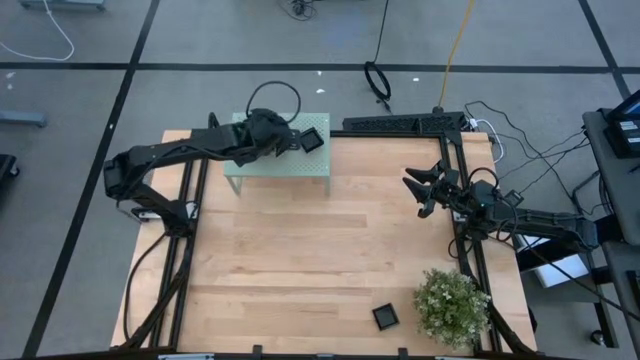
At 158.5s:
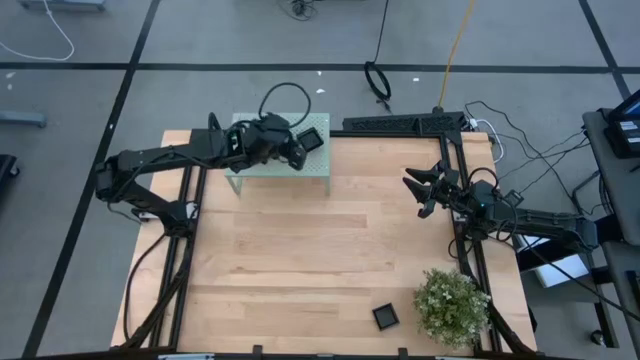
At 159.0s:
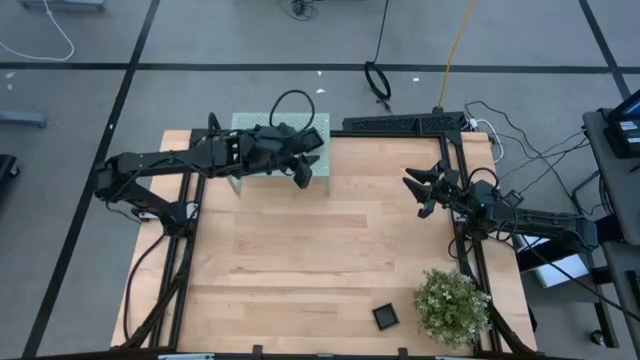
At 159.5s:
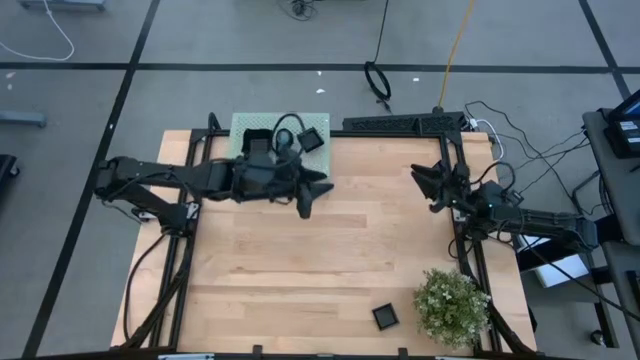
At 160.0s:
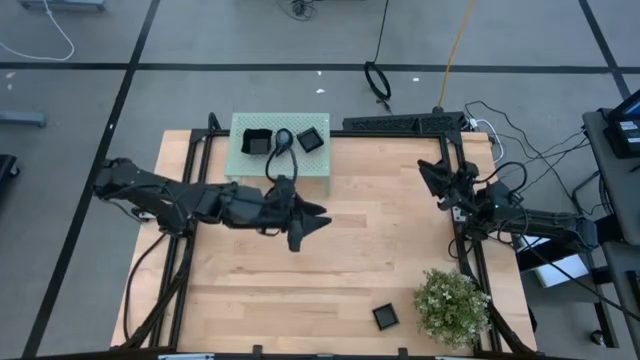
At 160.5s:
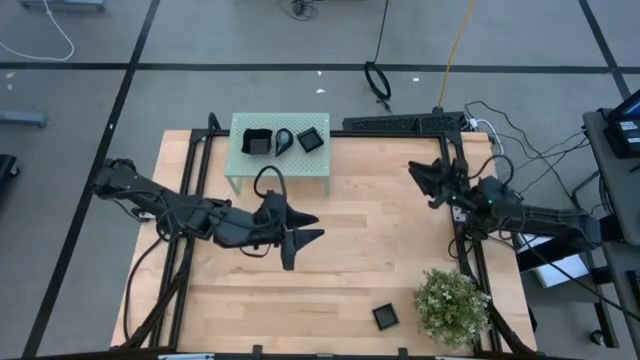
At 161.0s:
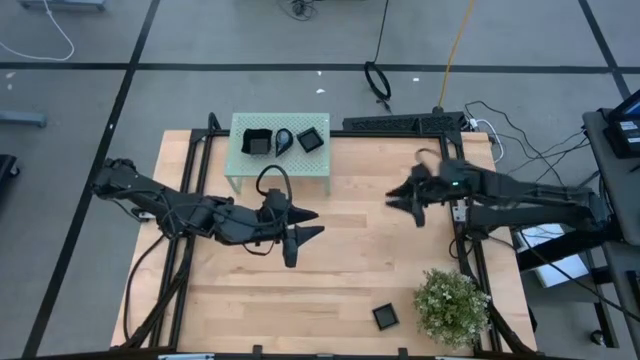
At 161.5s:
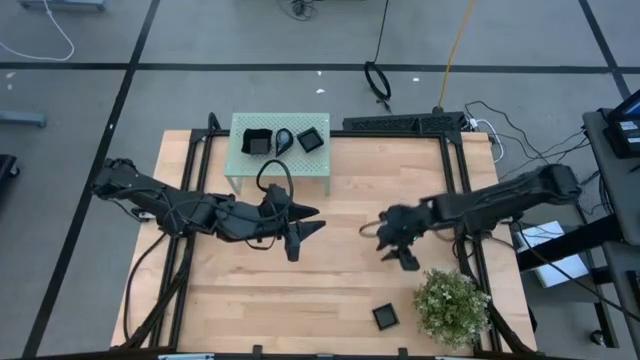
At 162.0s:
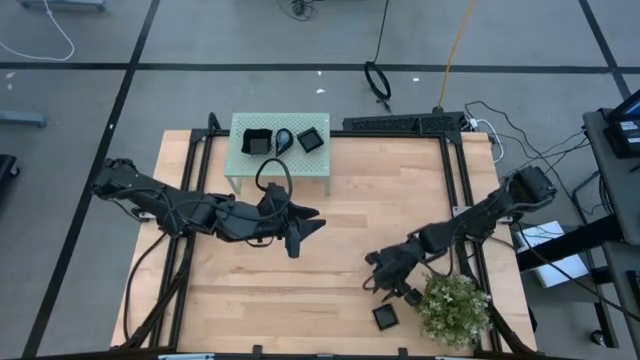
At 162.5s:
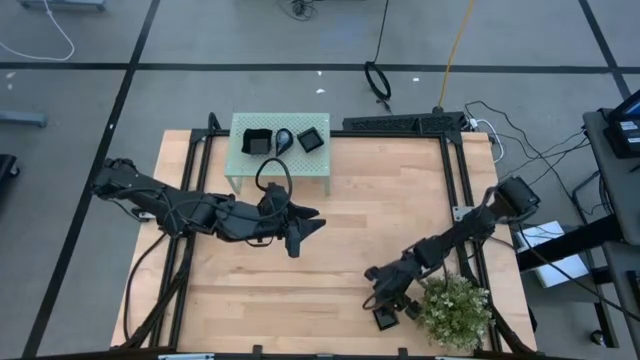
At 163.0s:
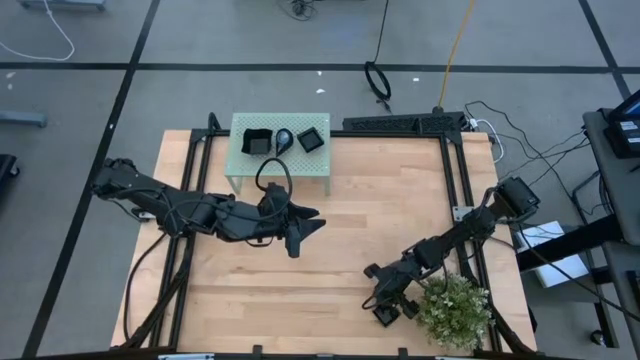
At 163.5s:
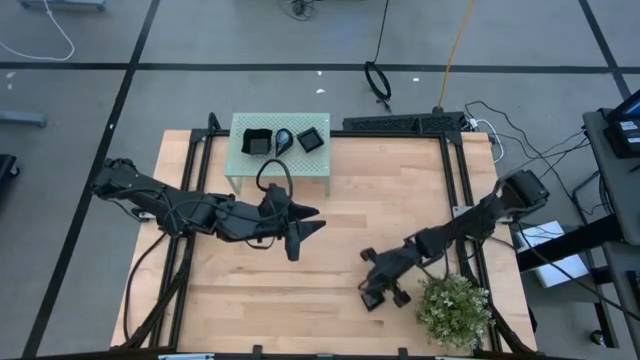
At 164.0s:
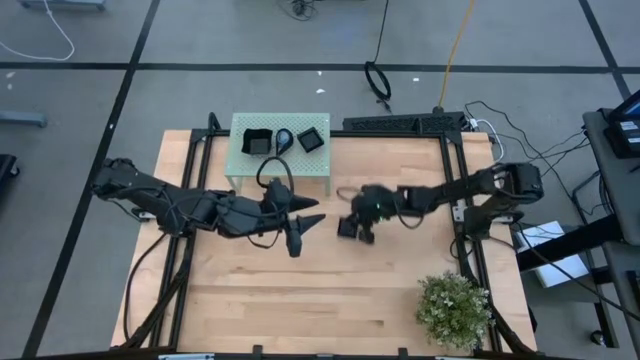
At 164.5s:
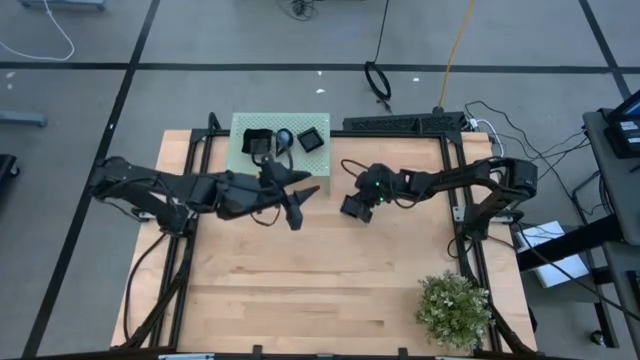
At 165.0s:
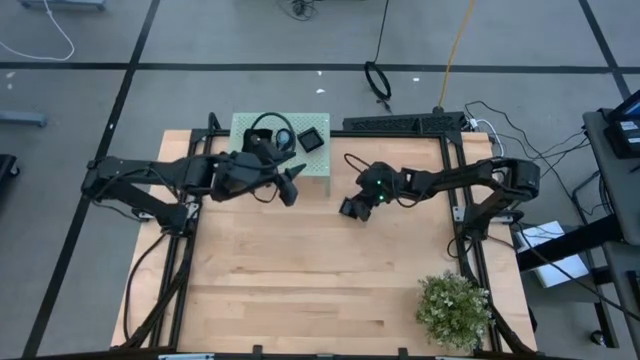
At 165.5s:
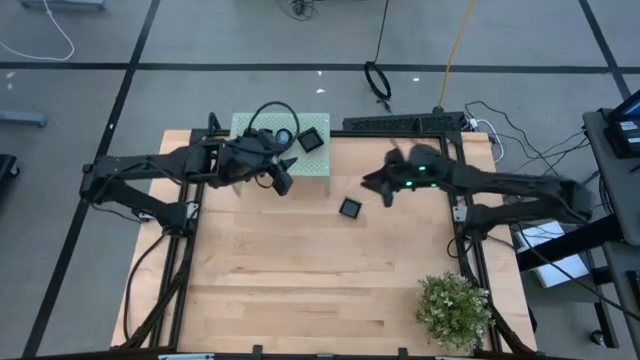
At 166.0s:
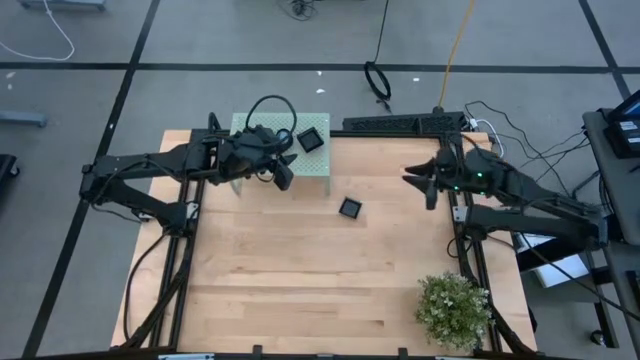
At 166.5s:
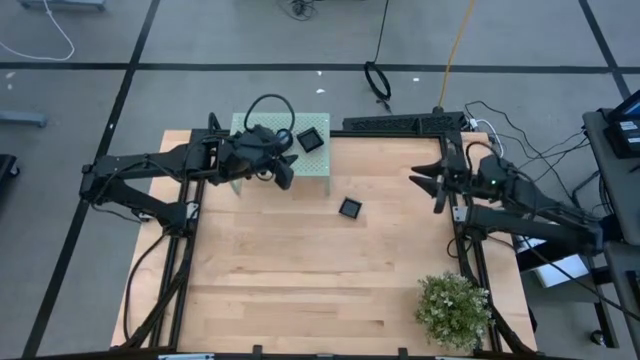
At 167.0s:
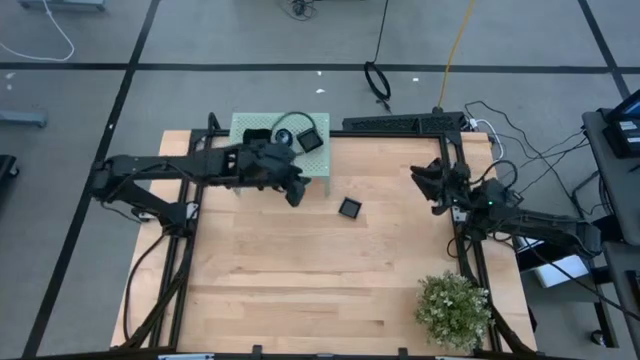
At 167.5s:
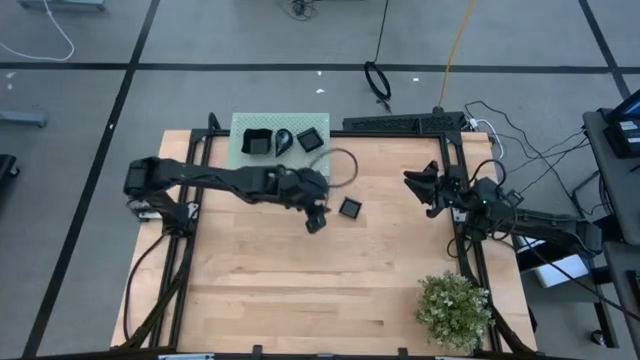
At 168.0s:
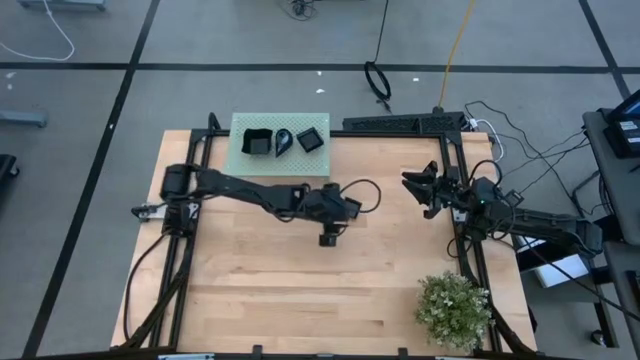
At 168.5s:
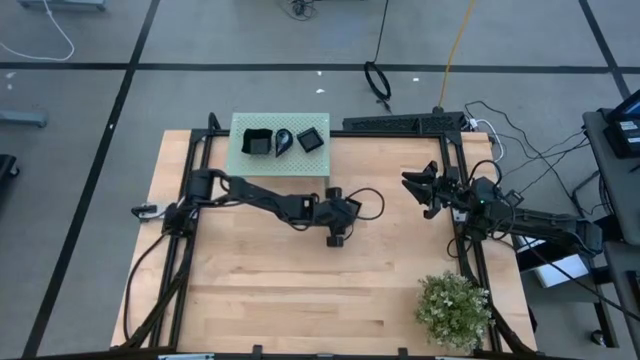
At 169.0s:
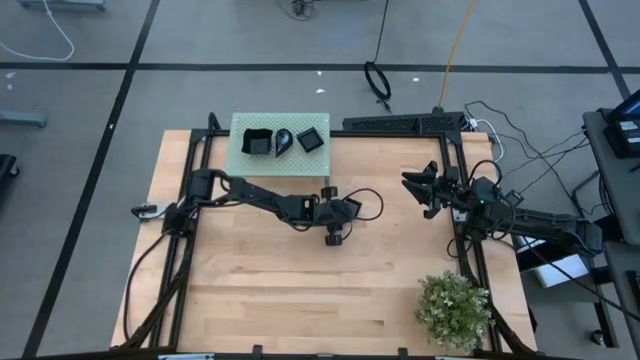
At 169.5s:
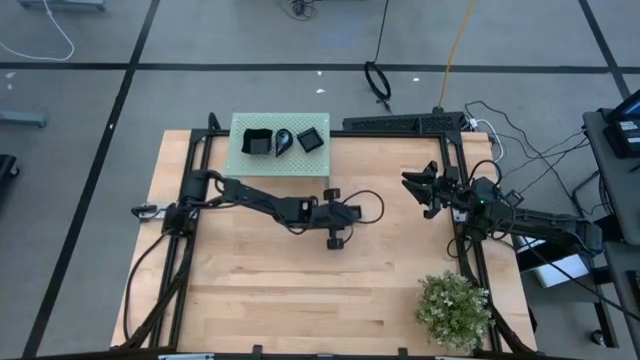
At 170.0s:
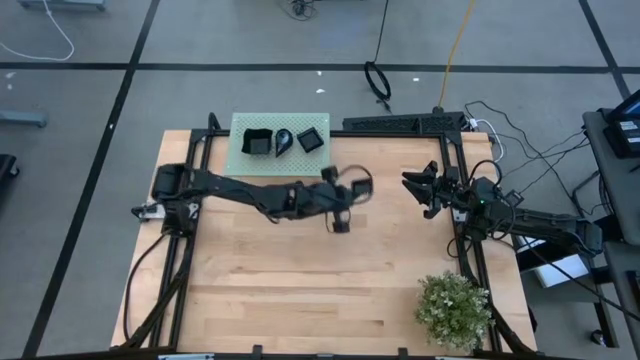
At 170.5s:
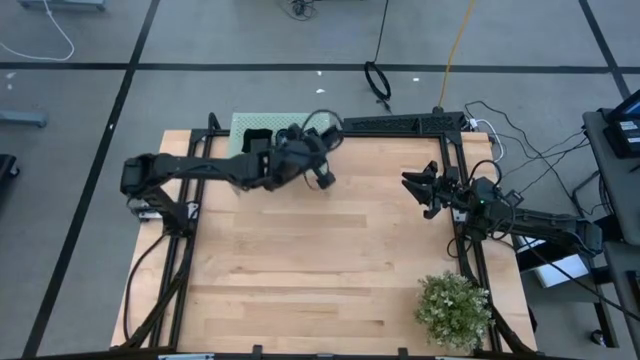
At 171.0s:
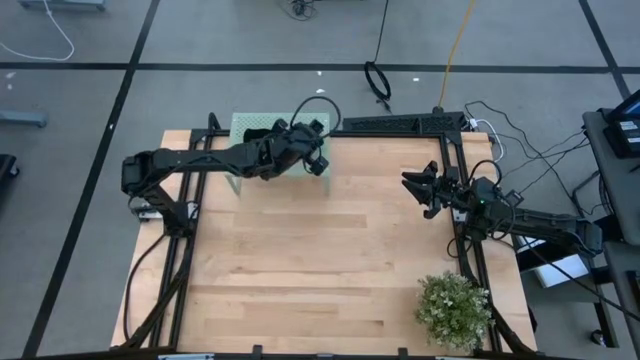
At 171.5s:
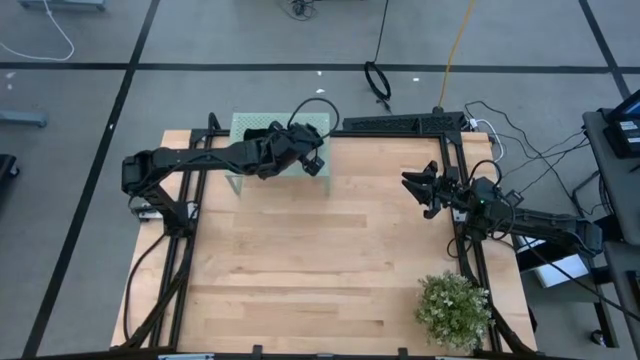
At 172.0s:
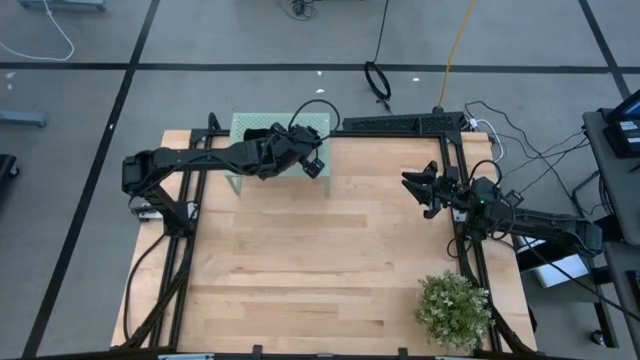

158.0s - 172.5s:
Task: Pick & Place Mini shaped plates
Stack the square plate on top of the stacked square plates on the shelf

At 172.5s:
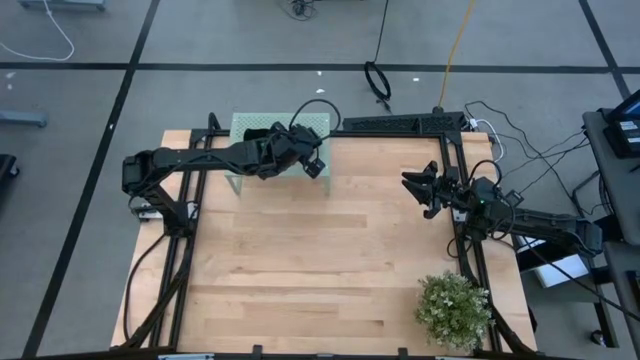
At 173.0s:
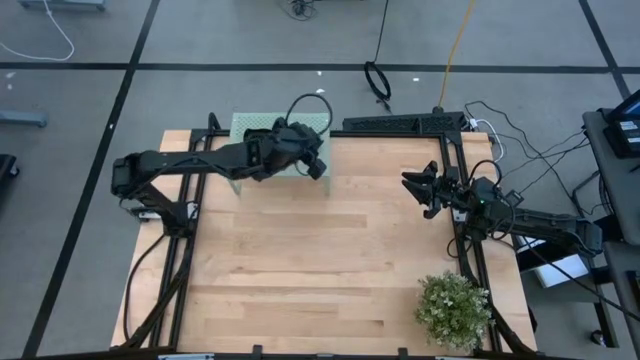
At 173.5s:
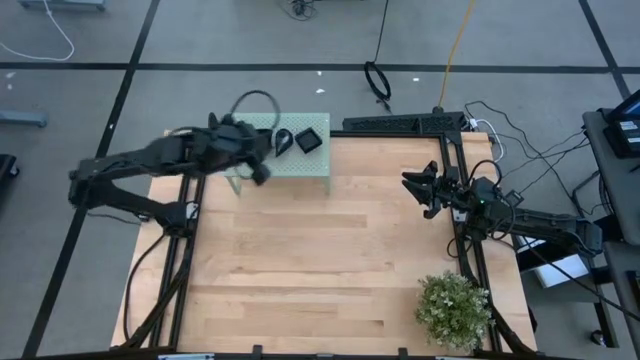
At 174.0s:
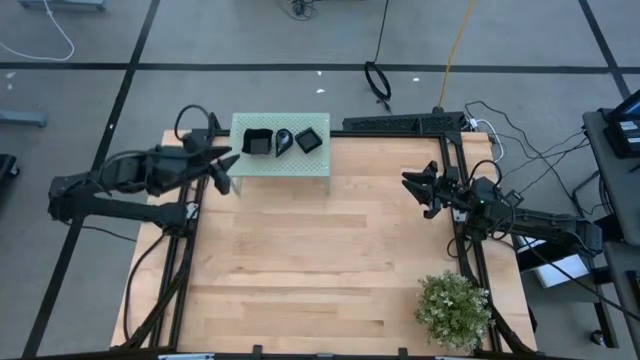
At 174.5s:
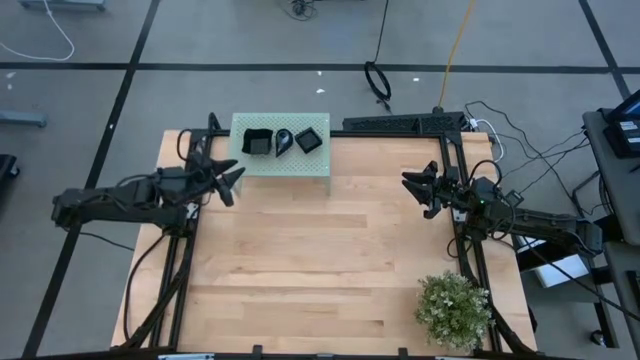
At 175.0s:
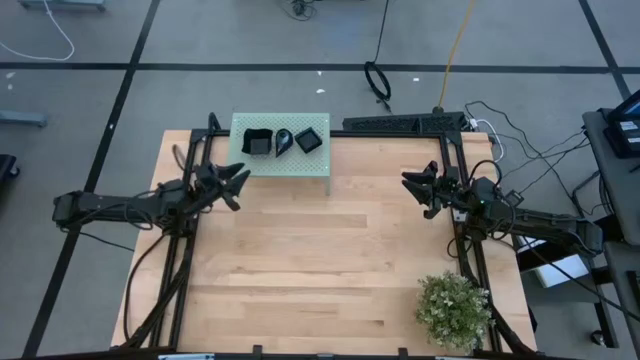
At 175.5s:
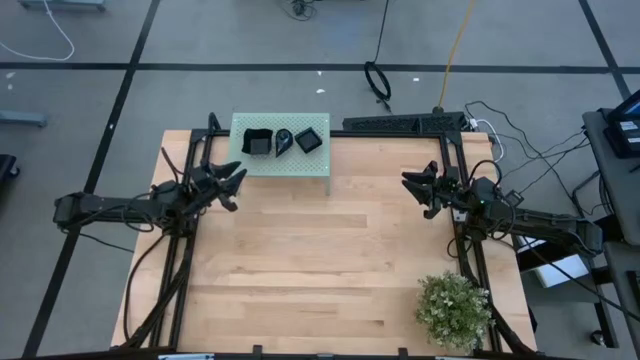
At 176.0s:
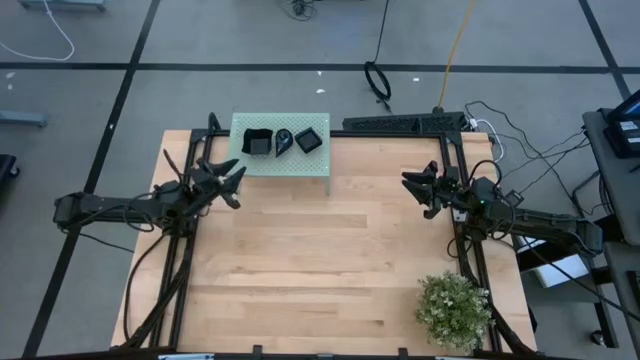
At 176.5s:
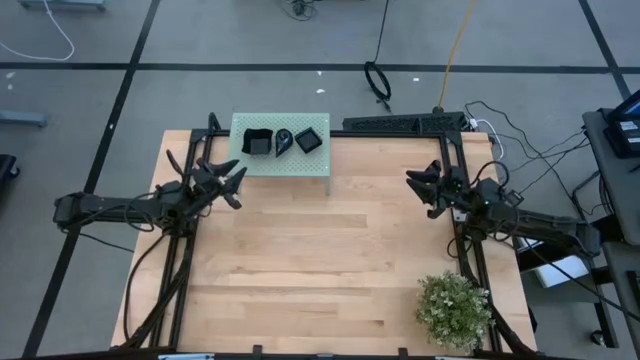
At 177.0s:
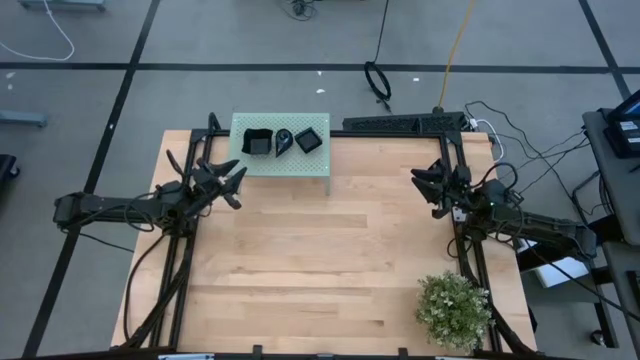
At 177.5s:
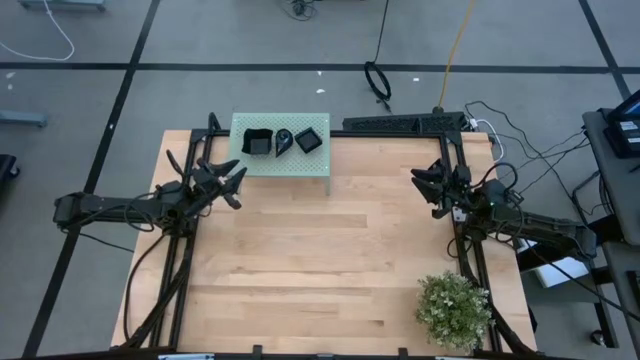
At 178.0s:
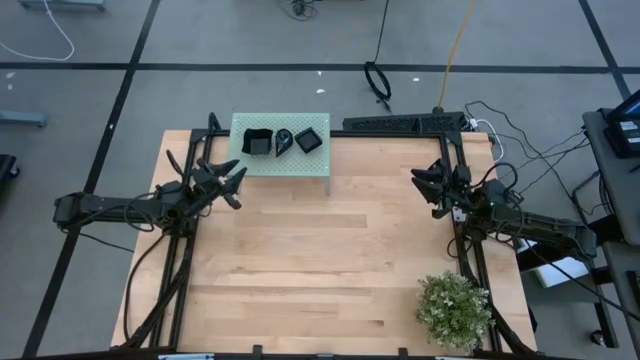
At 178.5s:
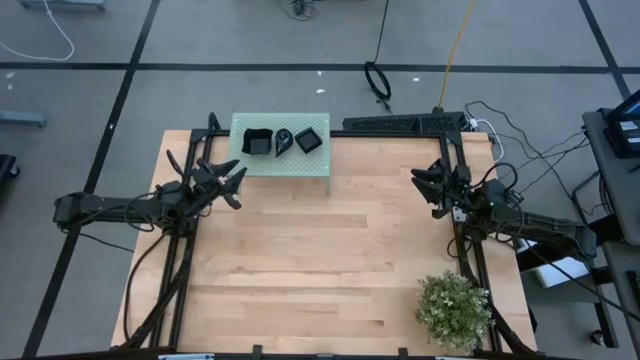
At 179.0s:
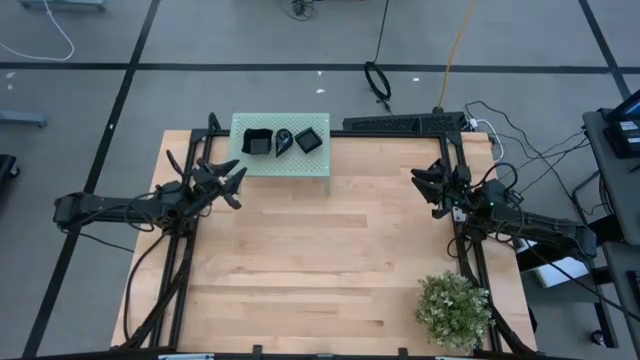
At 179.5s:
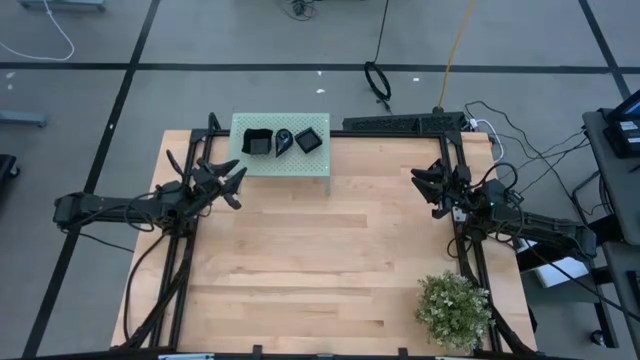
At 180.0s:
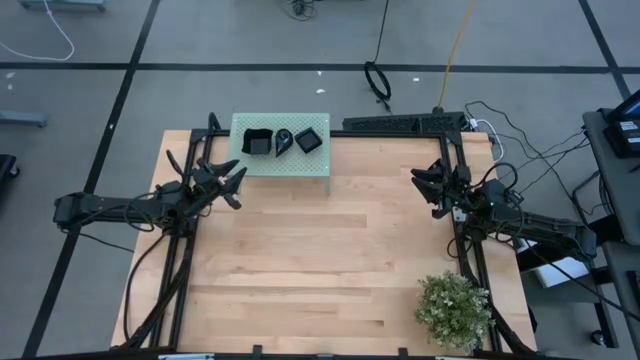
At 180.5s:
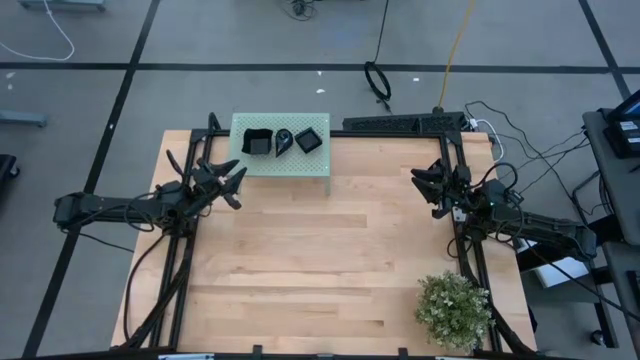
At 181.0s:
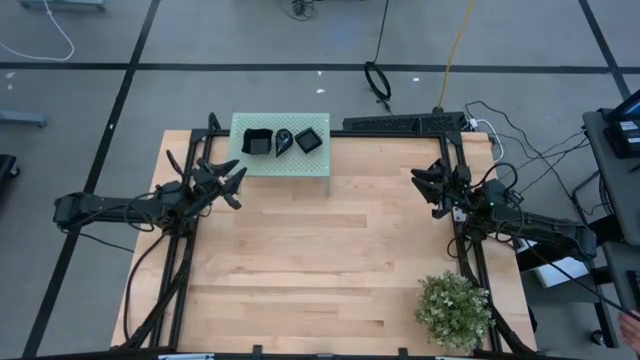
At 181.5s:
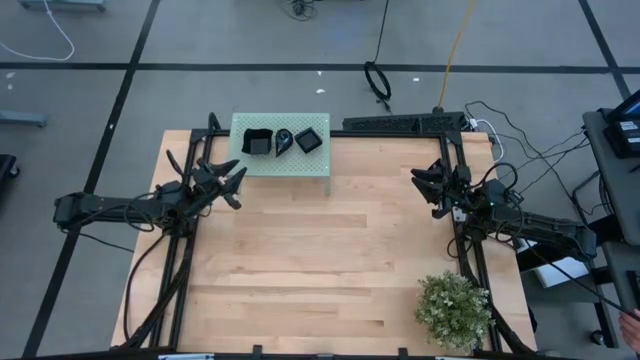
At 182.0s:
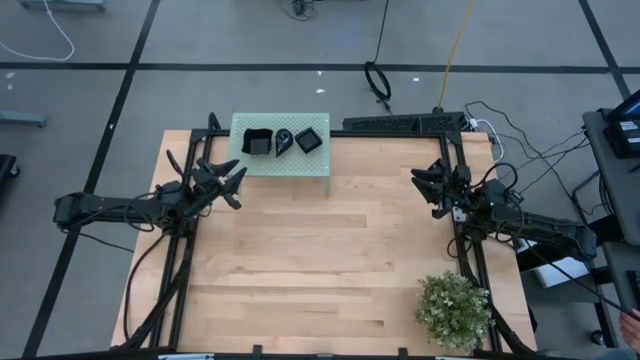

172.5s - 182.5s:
Return to Home Position
